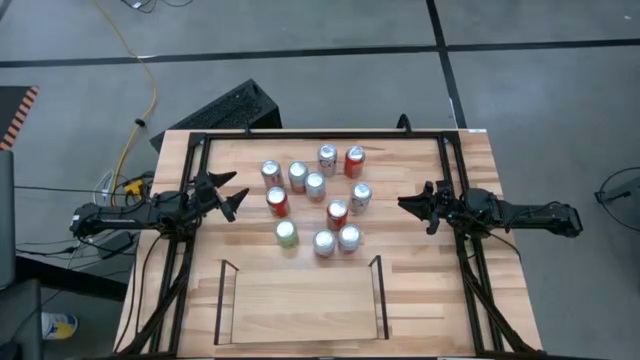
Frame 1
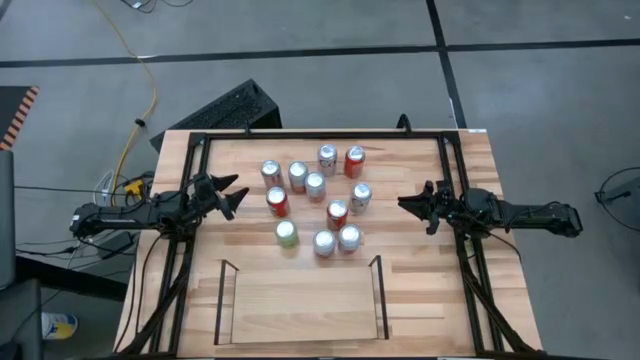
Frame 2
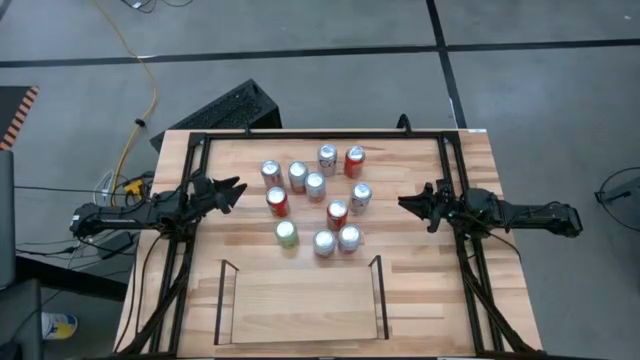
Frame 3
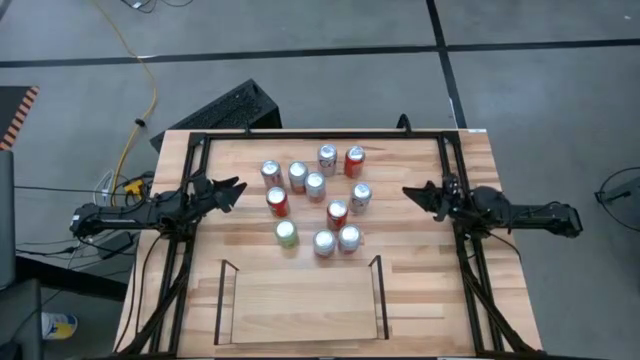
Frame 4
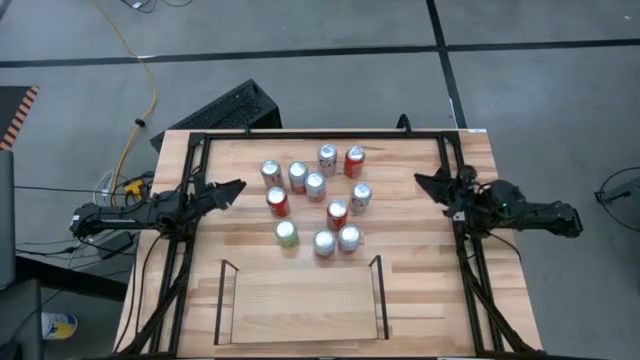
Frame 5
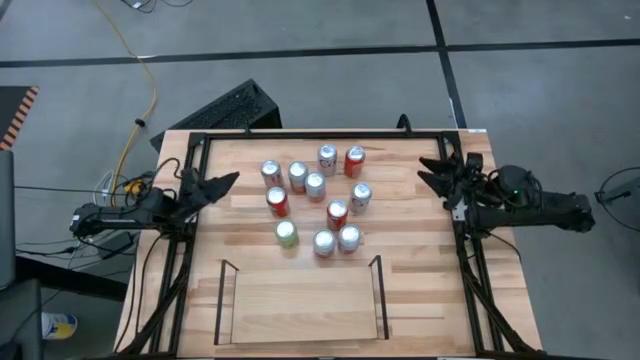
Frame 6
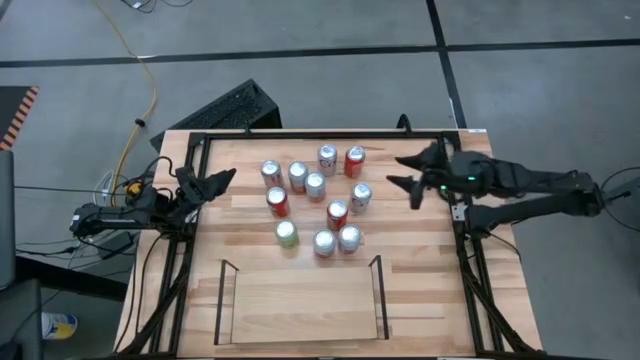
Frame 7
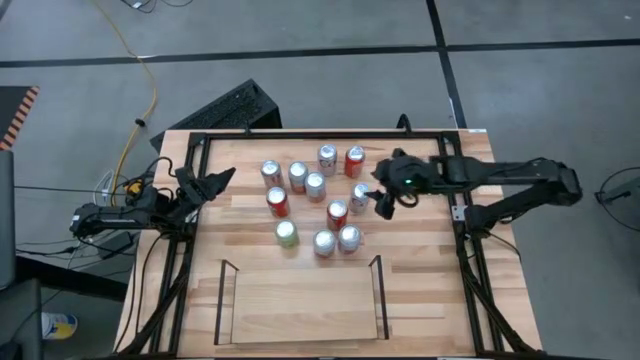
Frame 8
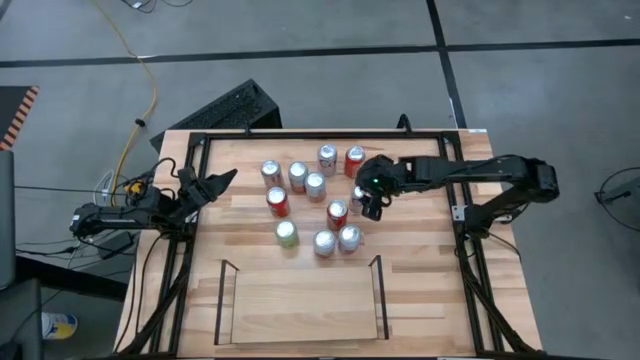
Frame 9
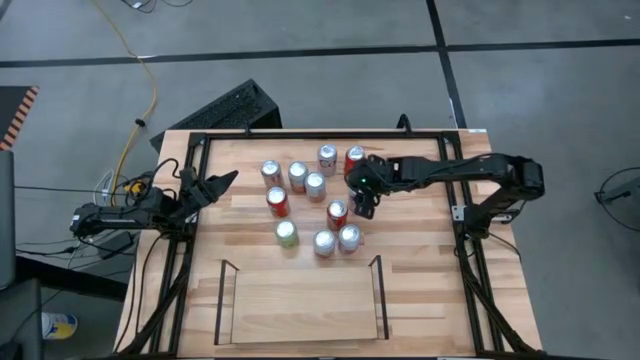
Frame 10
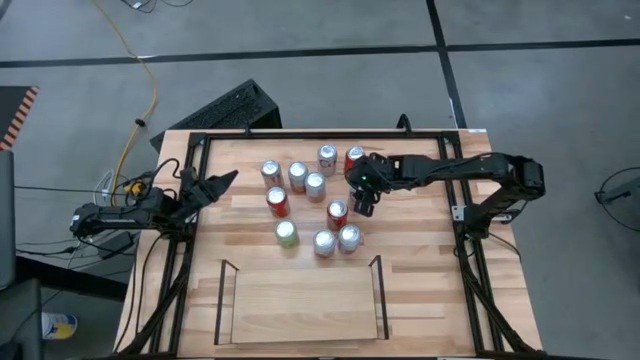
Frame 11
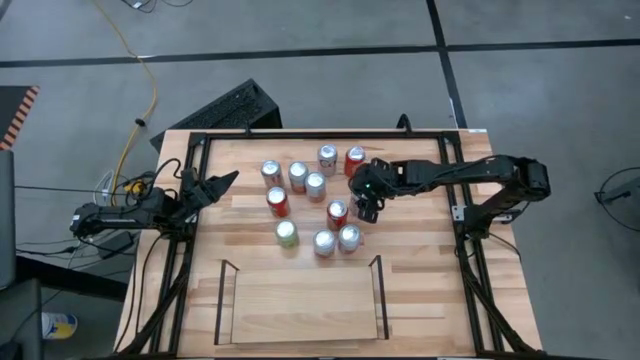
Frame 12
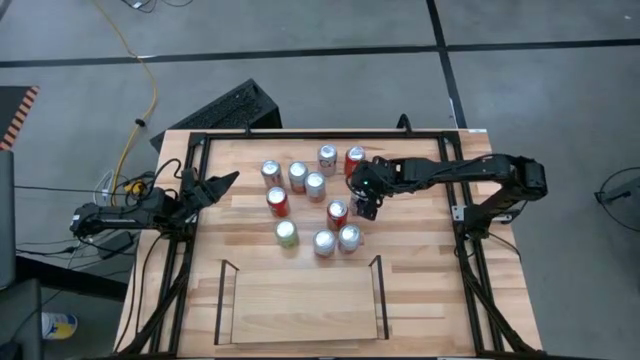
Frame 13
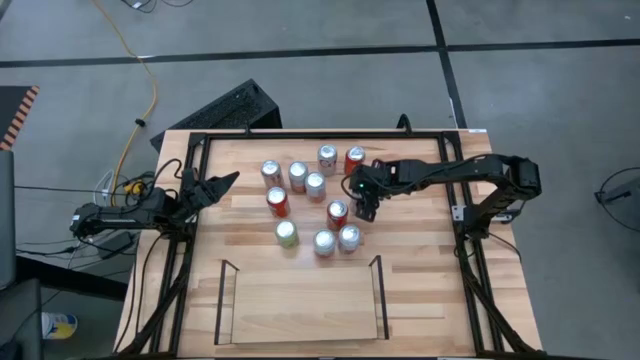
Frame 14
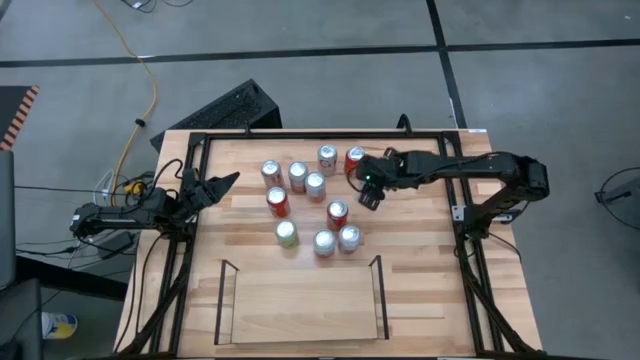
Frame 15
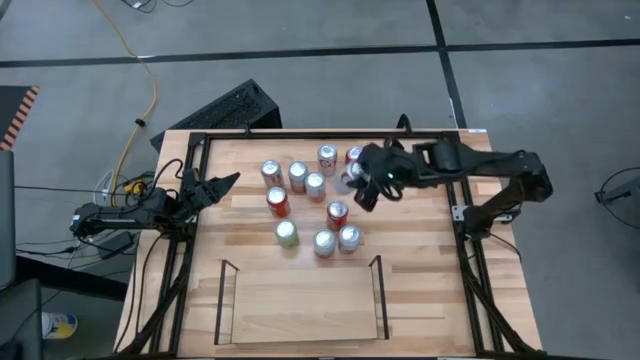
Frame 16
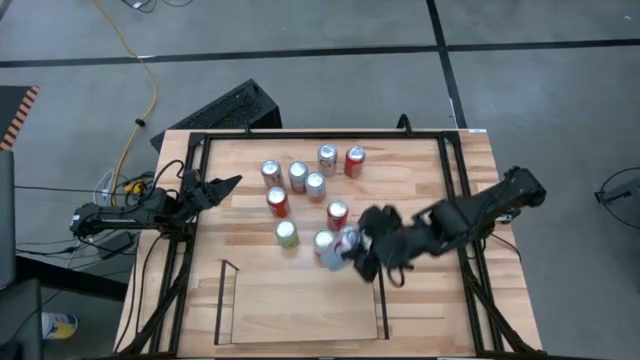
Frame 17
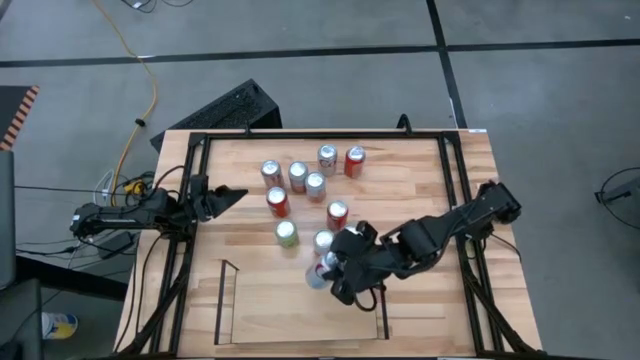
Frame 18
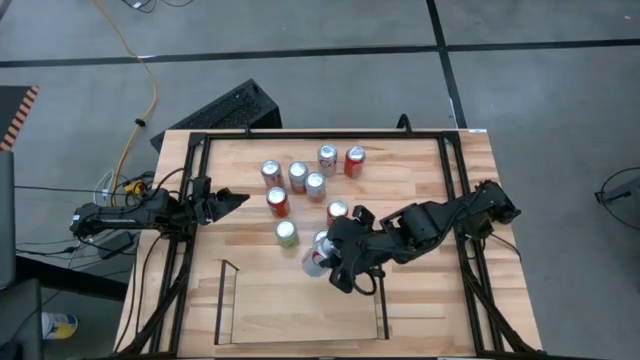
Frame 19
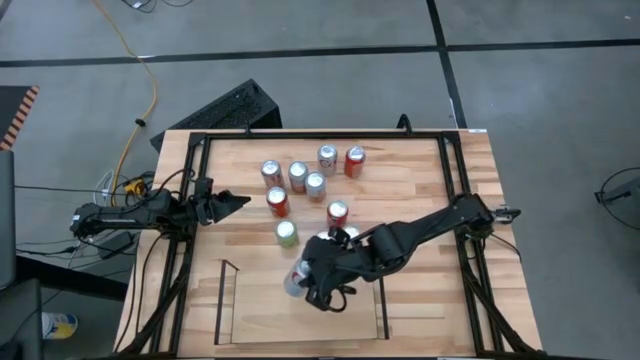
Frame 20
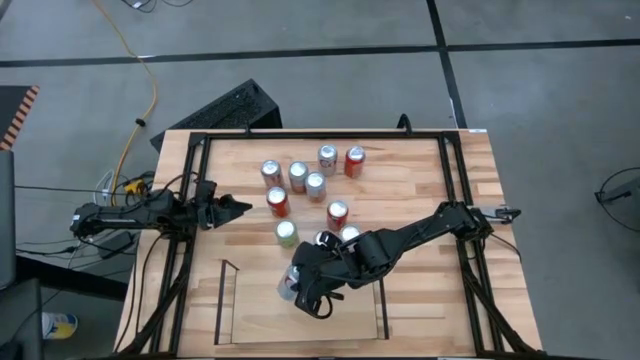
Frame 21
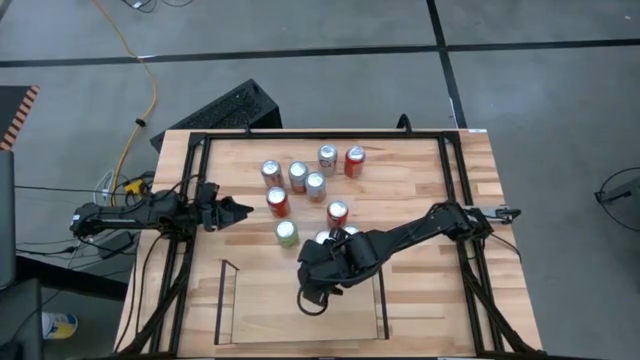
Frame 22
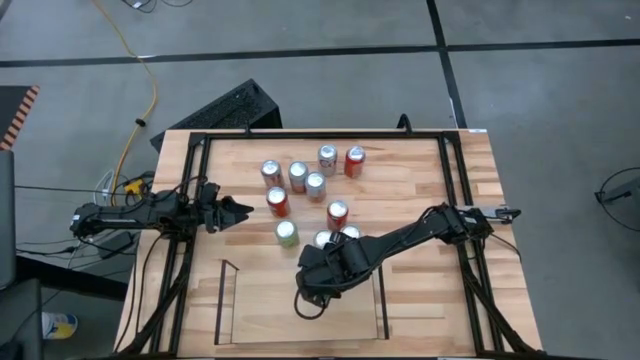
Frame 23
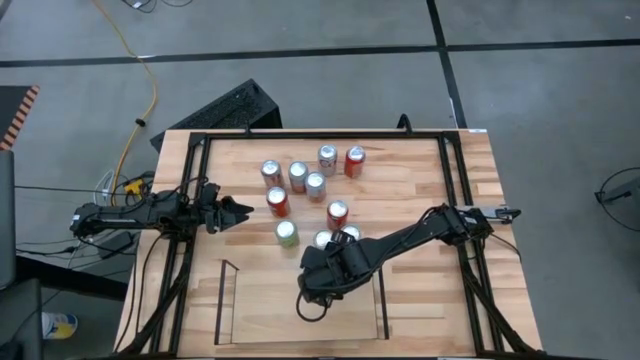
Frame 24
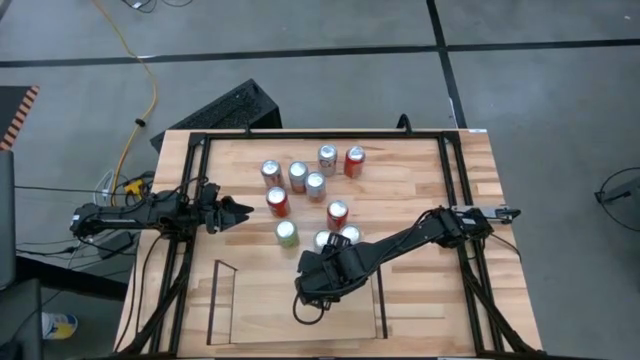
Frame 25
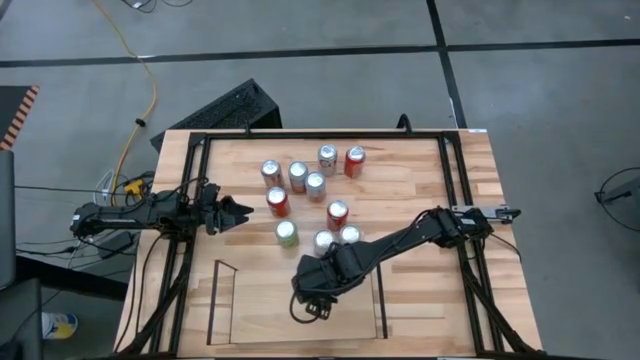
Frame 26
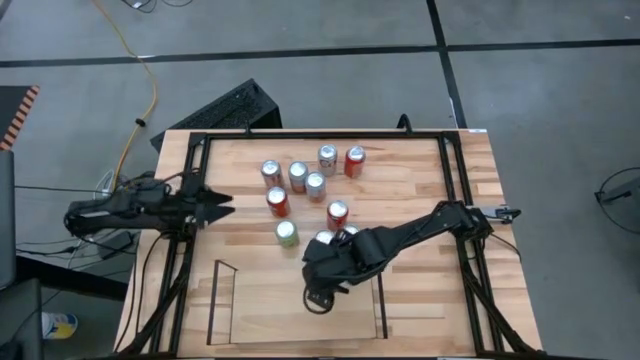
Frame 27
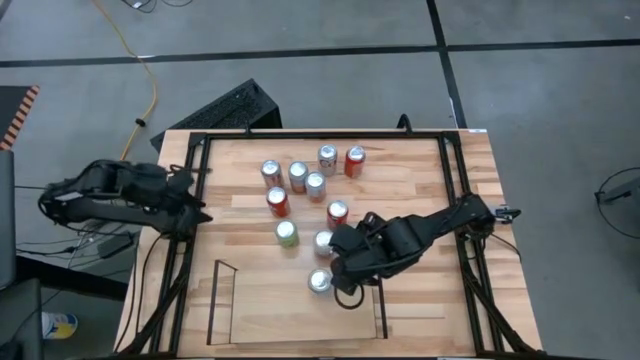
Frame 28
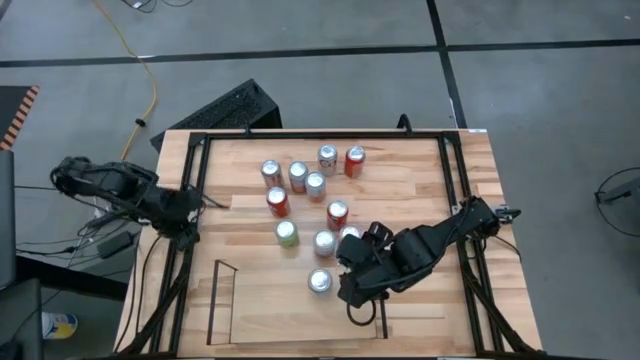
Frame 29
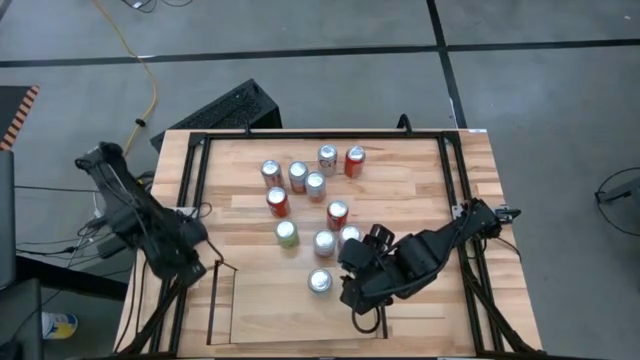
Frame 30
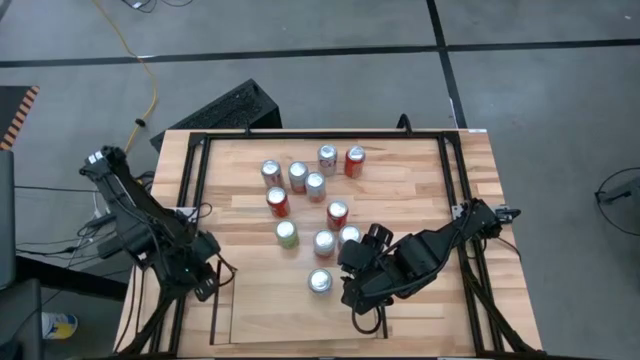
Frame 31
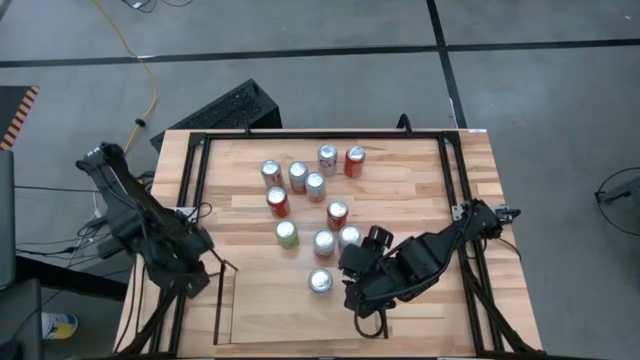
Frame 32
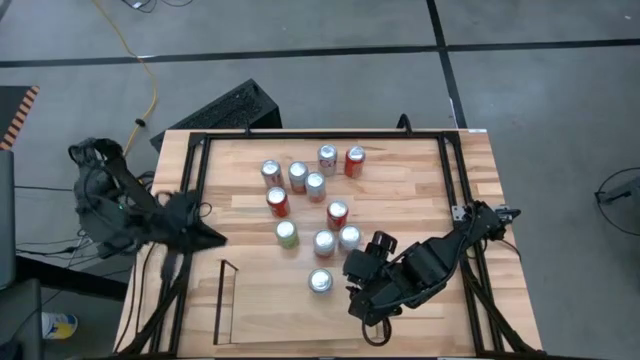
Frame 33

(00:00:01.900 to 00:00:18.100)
Task: Place canned beverage on shelf
Put the silver soda can on the shelf

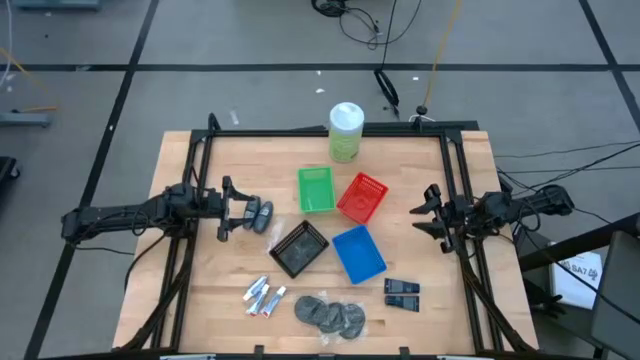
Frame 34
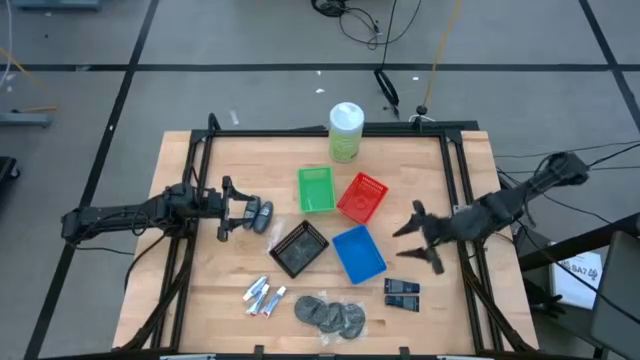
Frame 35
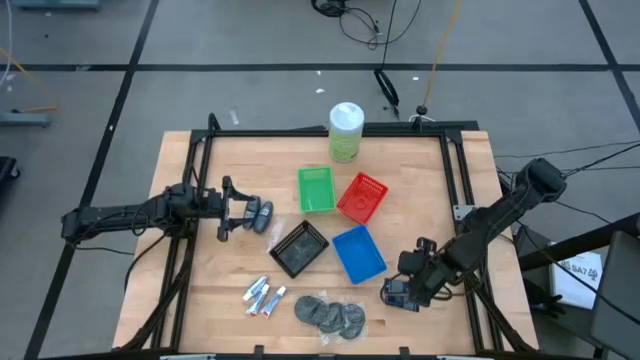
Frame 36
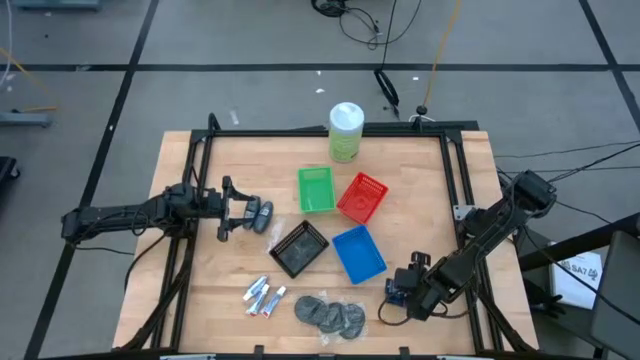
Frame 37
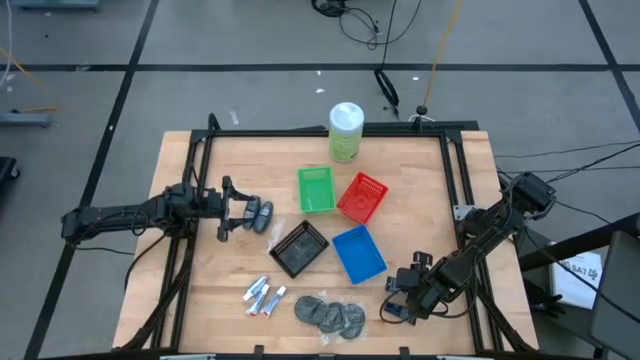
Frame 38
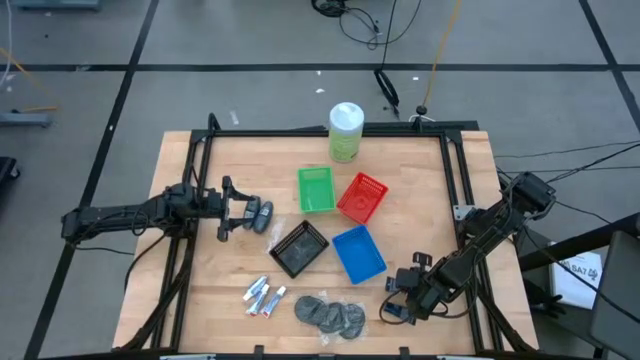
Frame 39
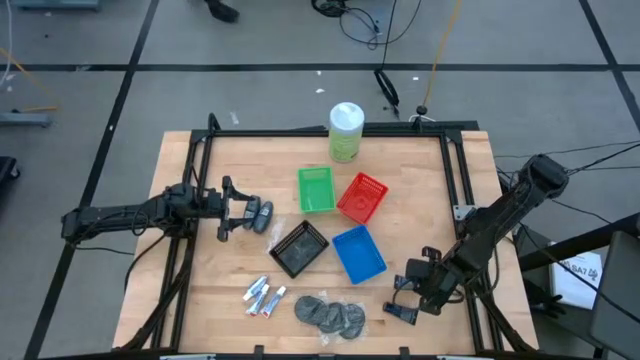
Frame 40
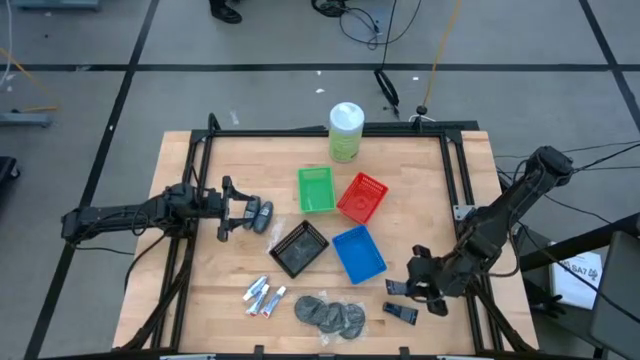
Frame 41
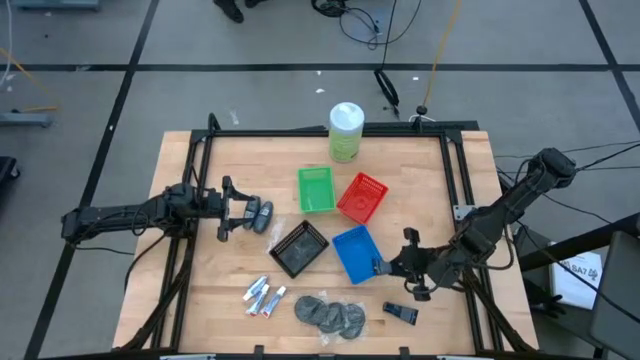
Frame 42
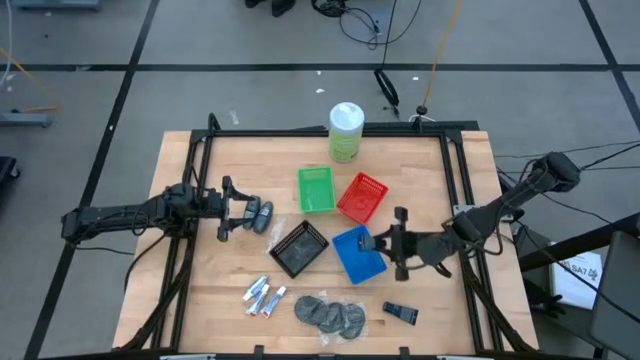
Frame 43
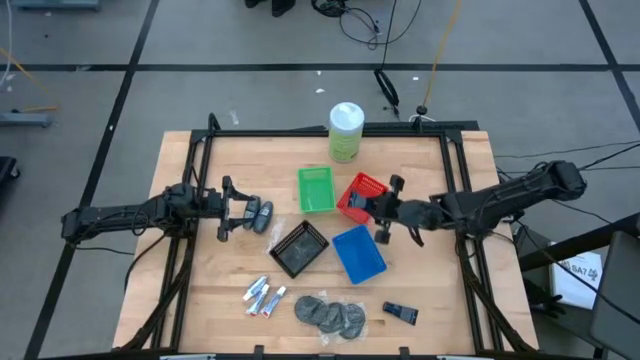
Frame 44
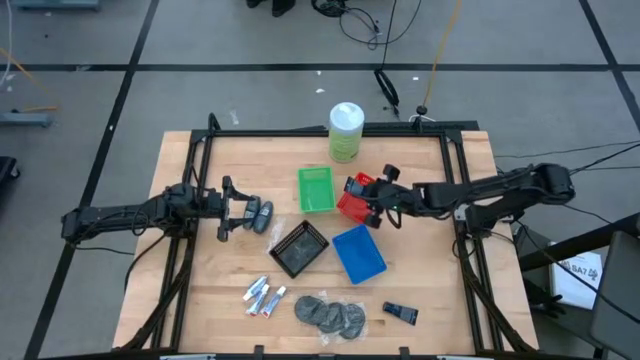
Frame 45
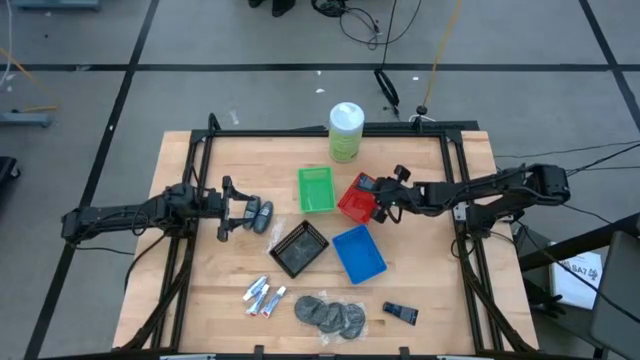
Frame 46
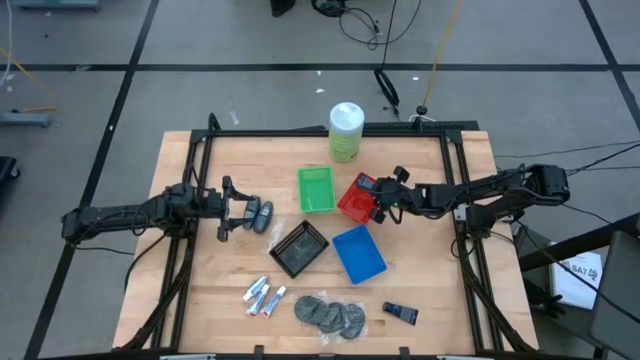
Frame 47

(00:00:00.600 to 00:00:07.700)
Task: Pick & Place Travel size toiletries
Put the top blue shaving cream into the red bin
